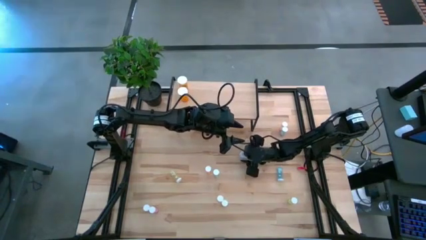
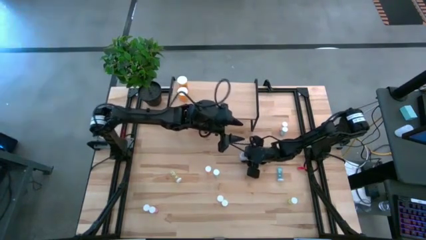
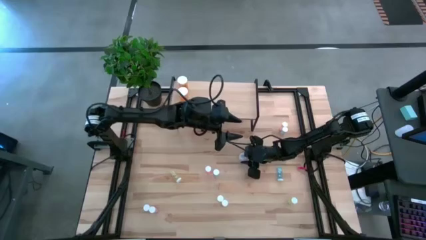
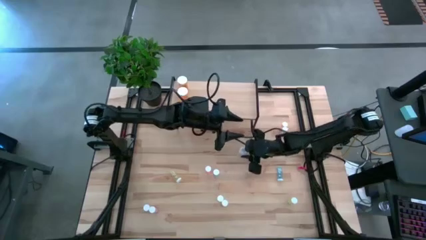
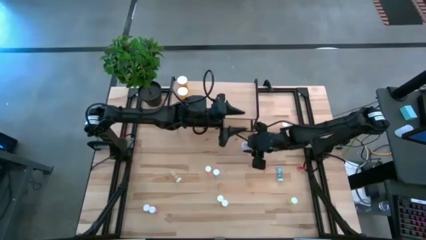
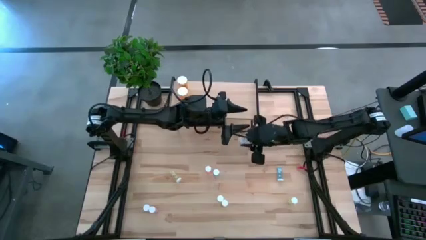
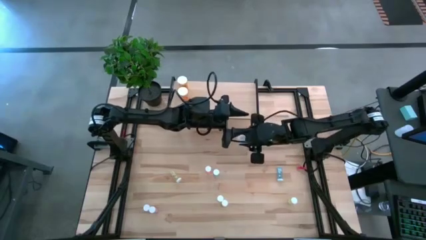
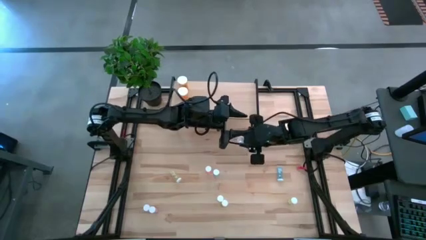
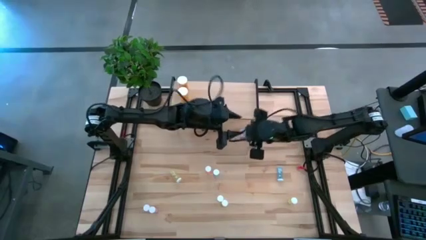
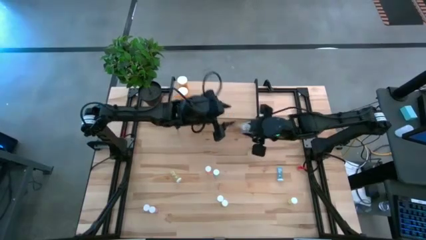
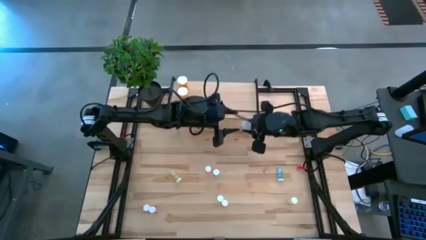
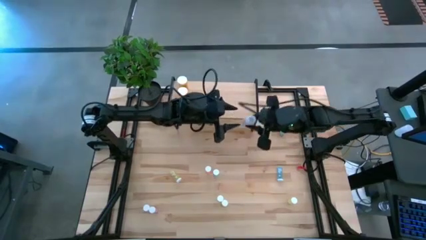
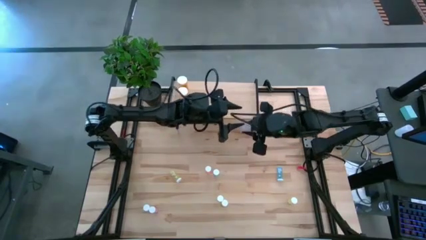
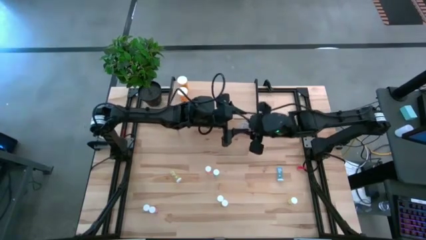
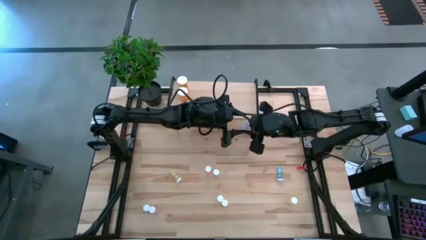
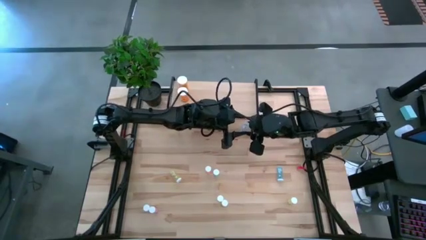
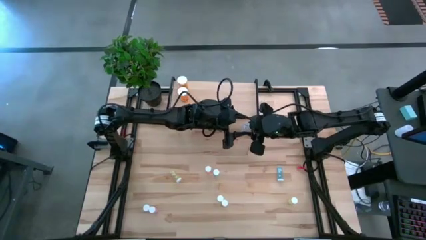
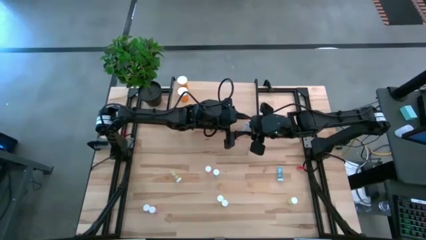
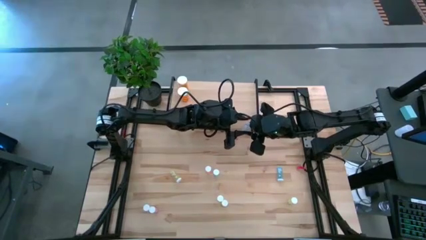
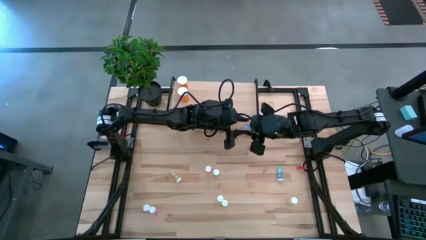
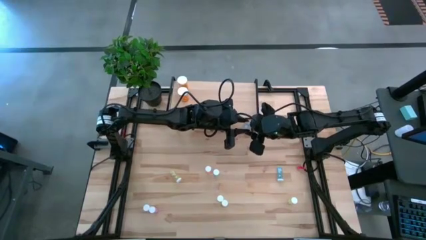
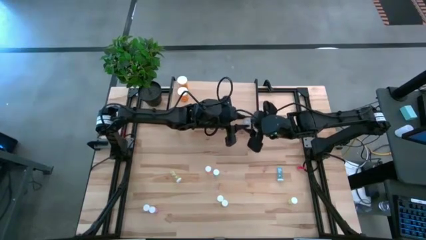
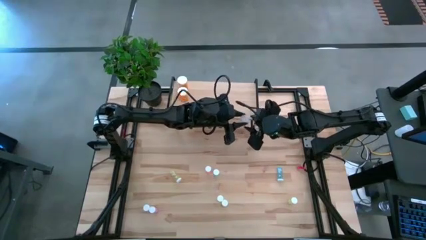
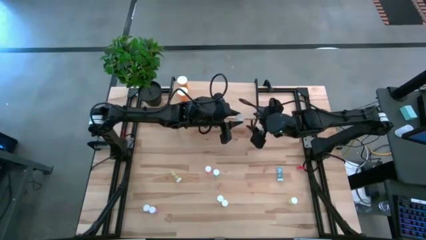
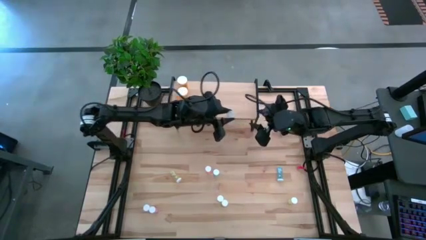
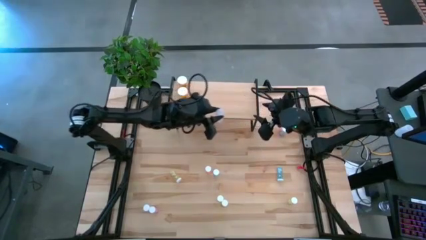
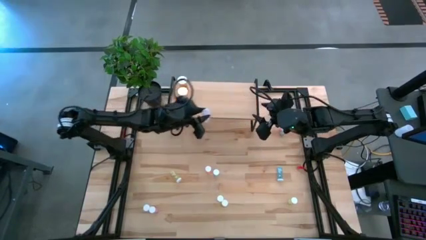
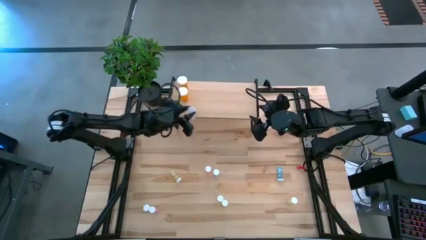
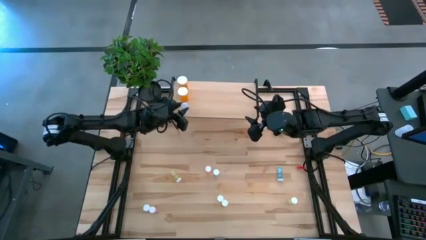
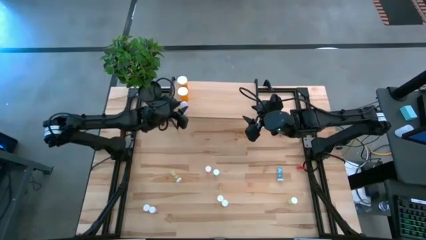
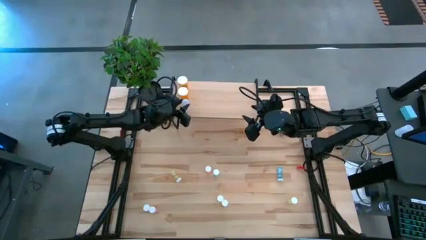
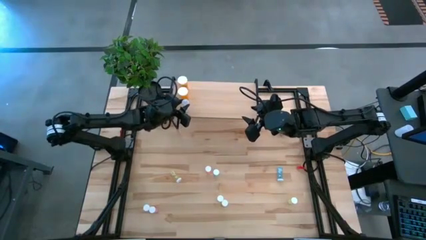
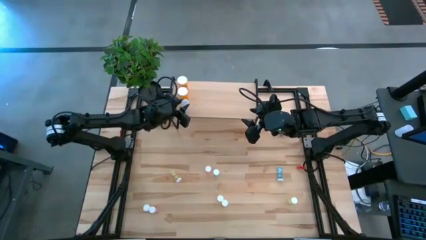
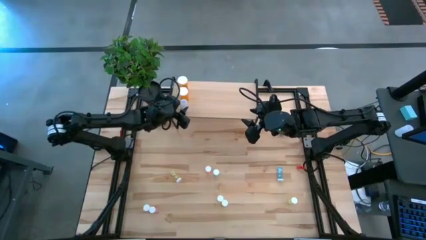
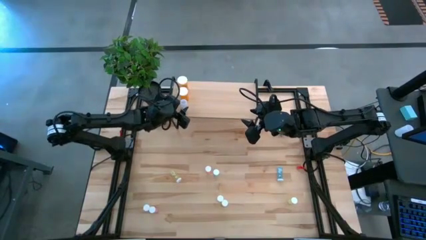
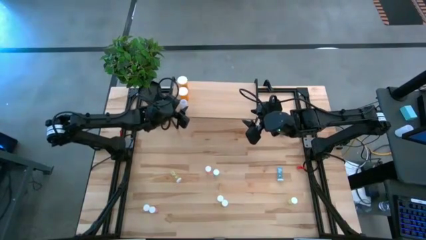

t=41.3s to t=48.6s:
Task: Pick and place medicine bottles onto shelf by color
Put the transparent pill bottle on the shelf

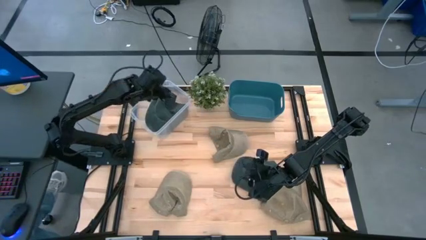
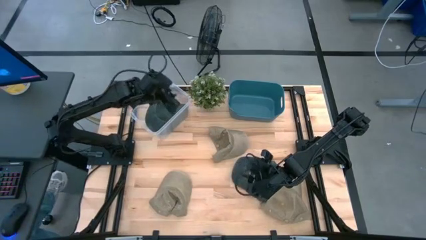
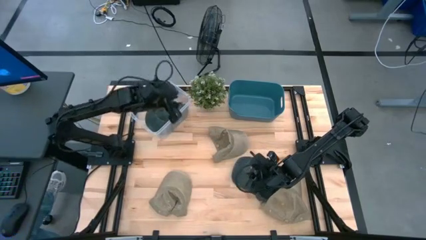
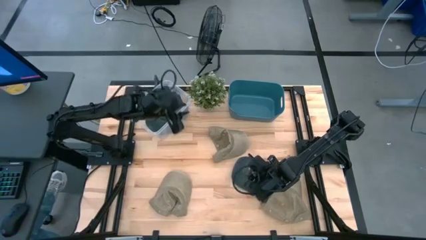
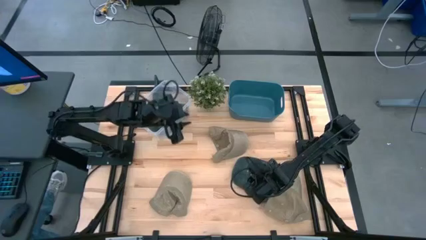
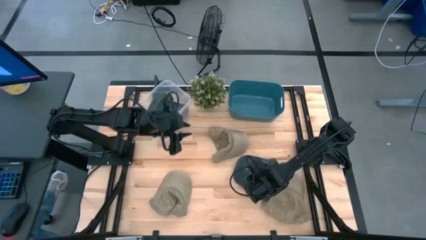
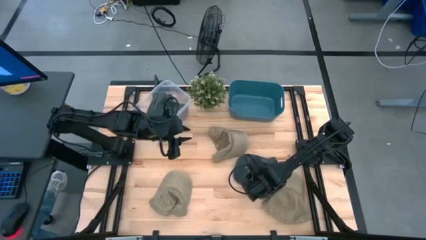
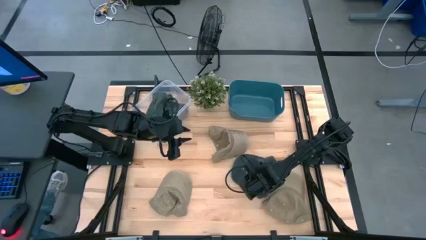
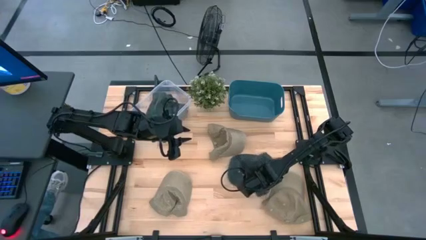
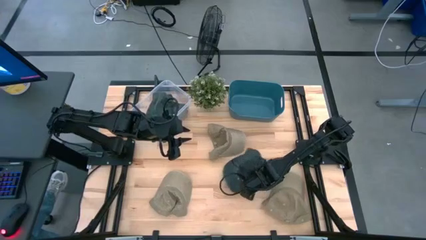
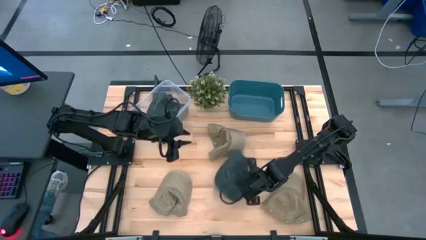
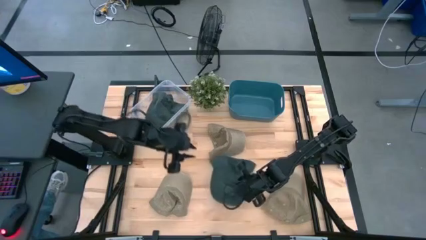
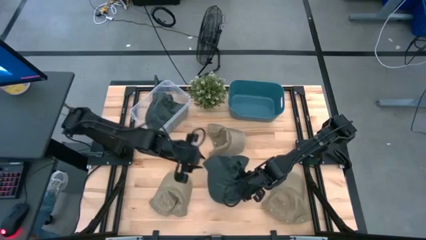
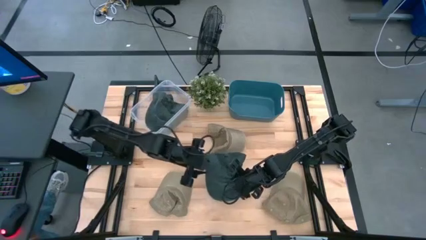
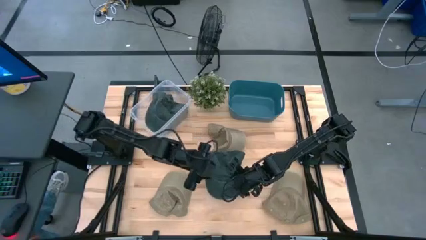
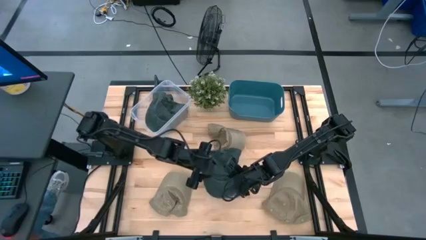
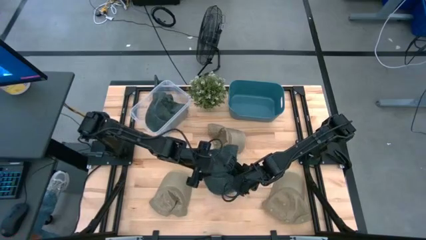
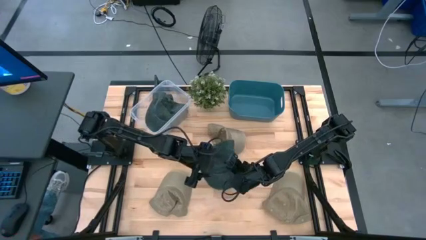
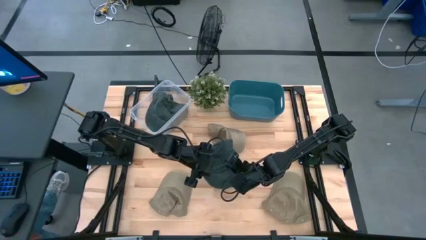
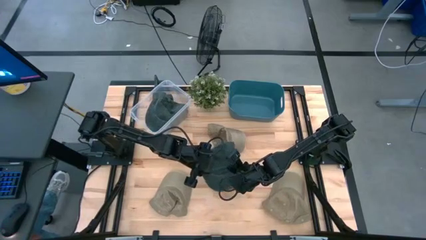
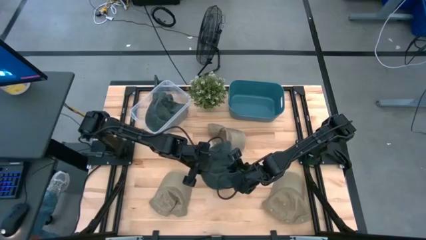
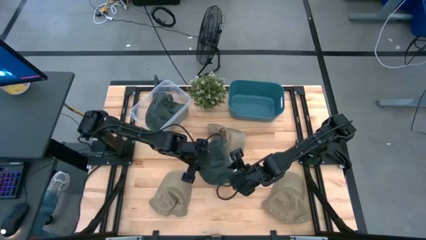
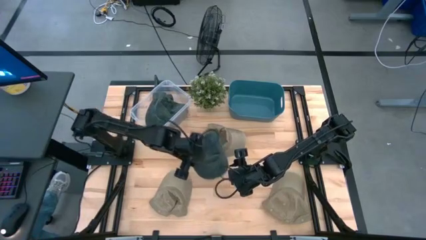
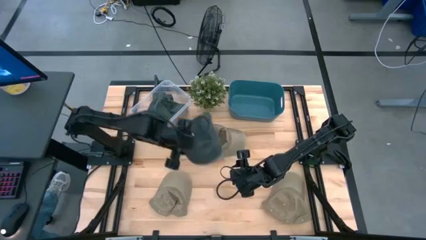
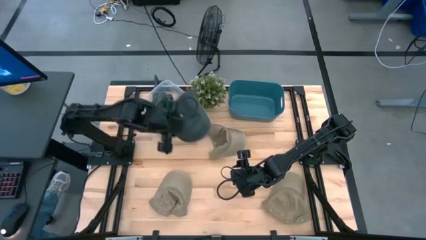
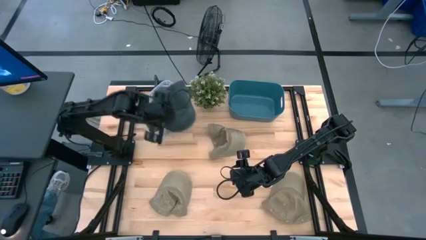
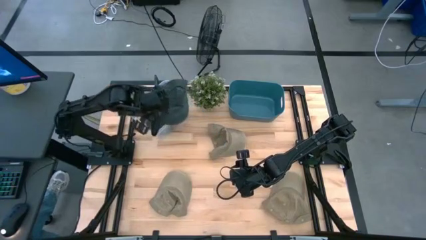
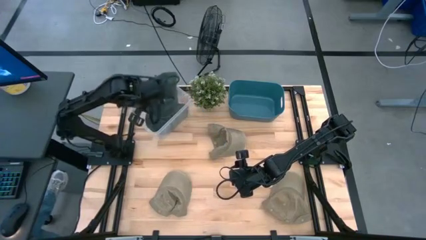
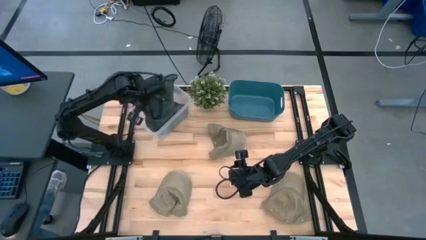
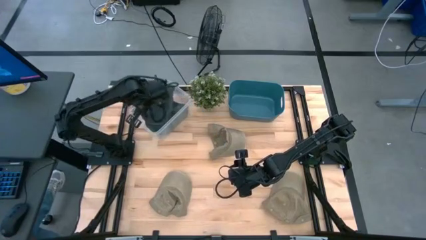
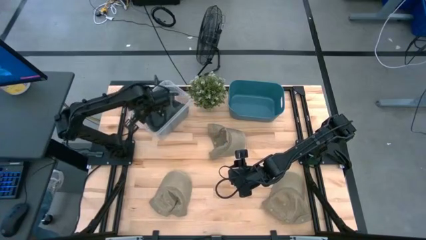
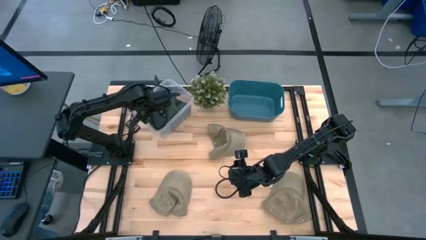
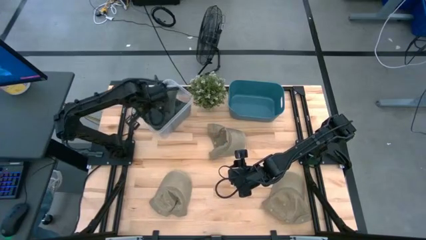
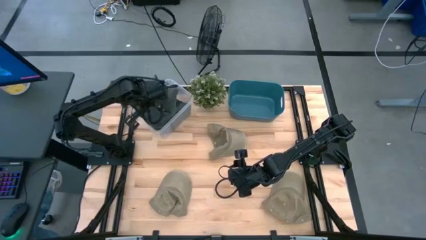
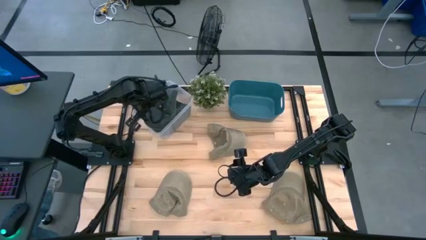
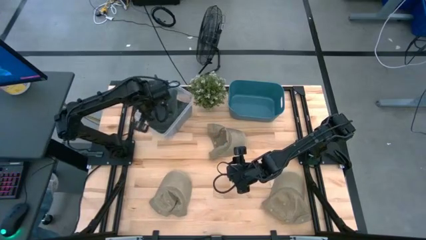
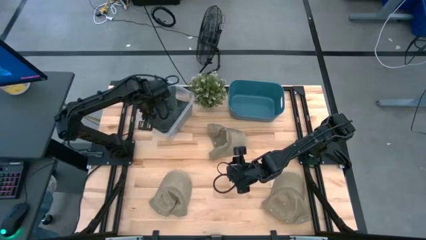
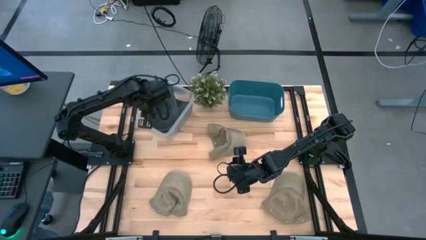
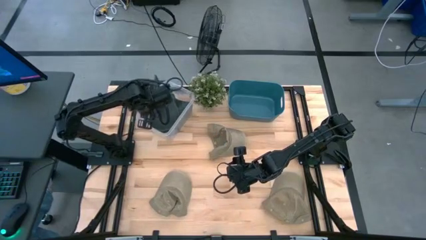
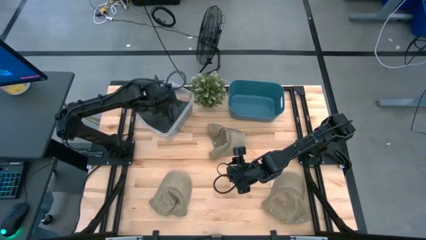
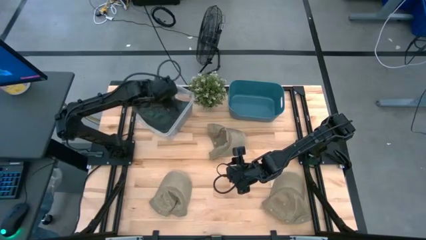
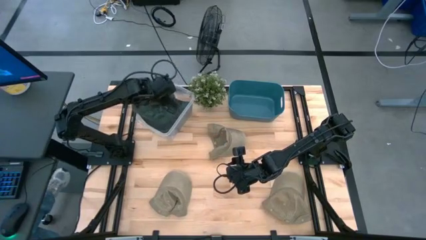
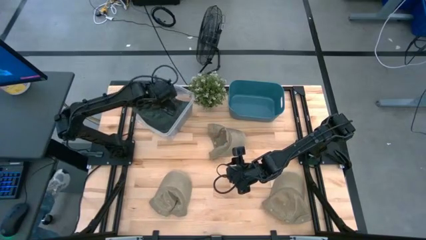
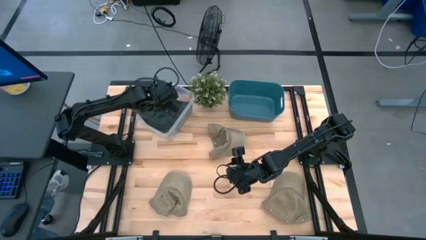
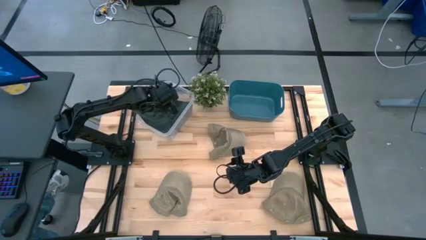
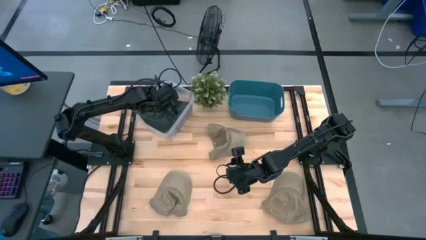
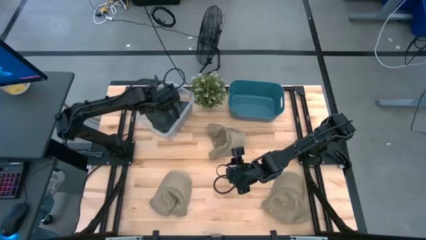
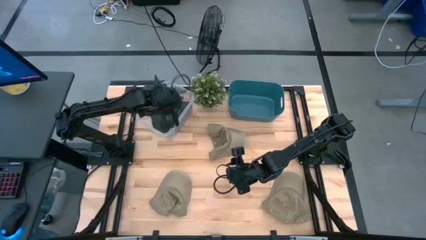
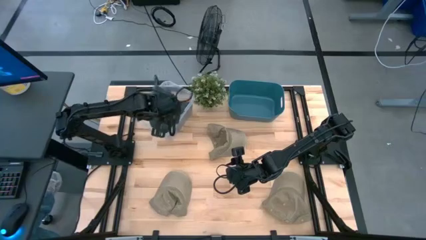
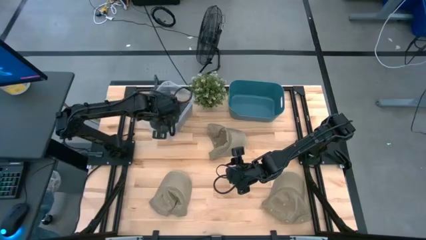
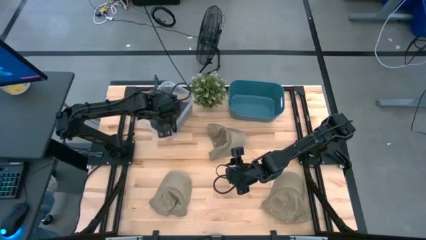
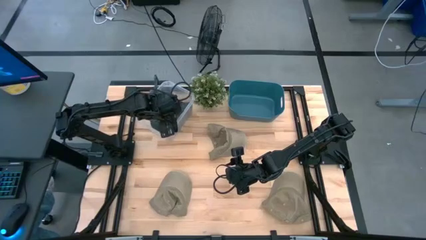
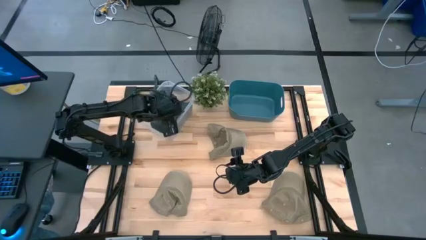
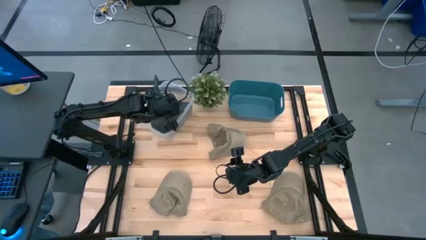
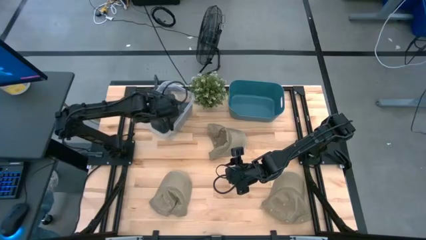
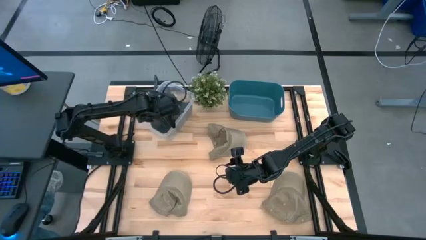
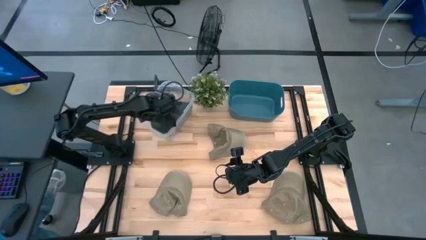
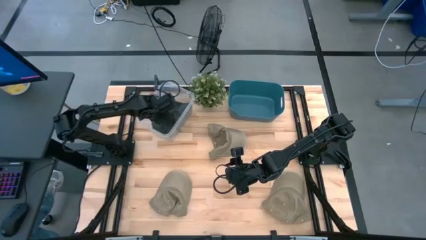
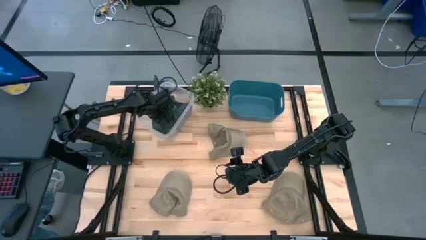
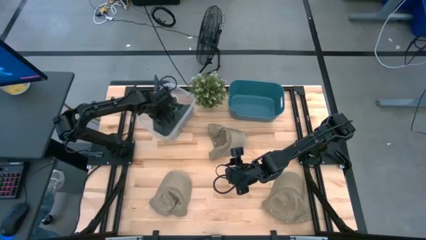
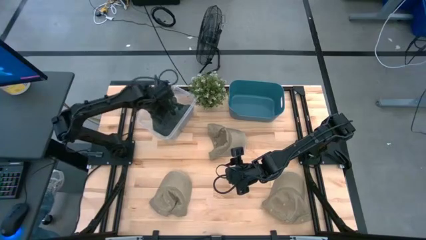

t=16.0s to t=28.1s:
Task: Pick & Place hat
Put the gray cap into the transparent bin
